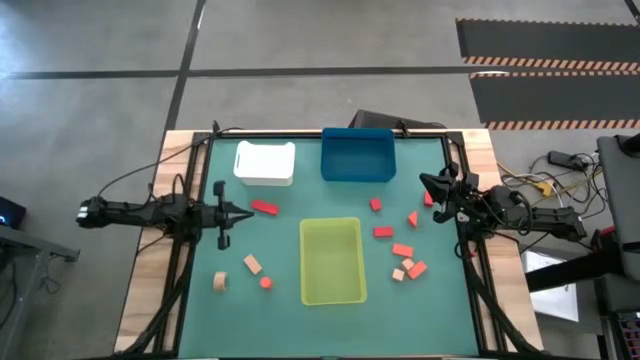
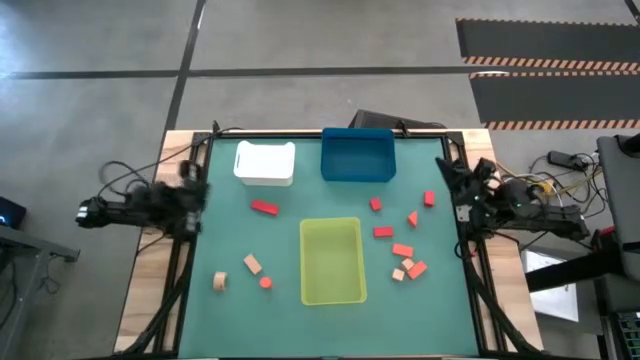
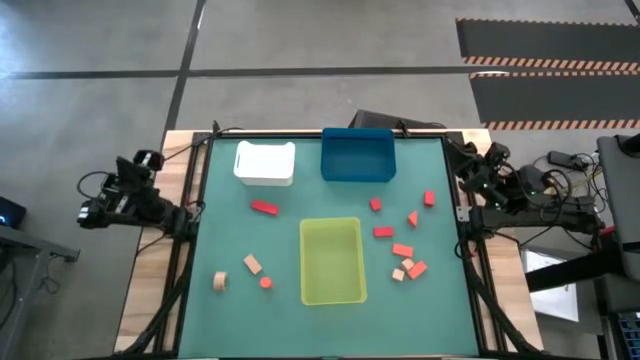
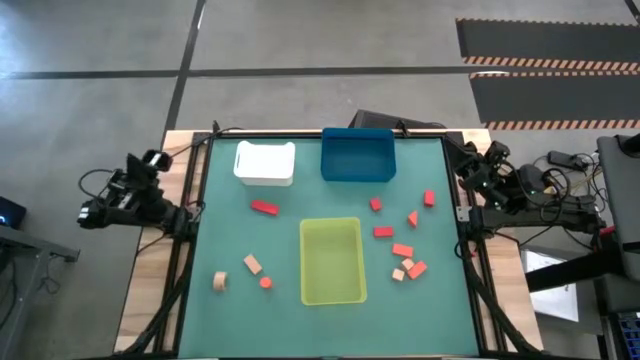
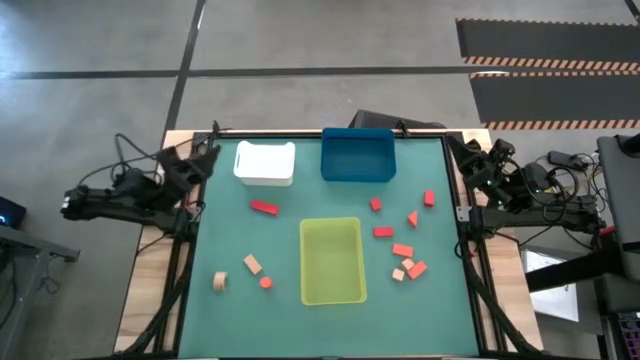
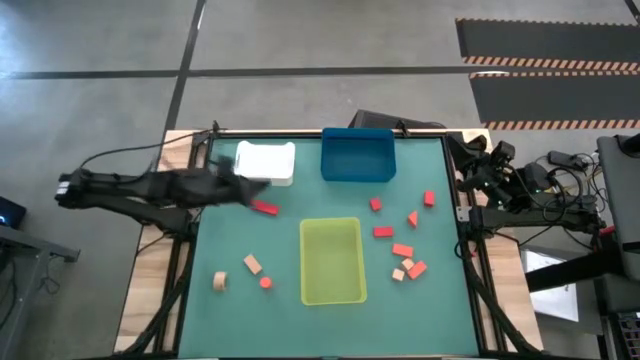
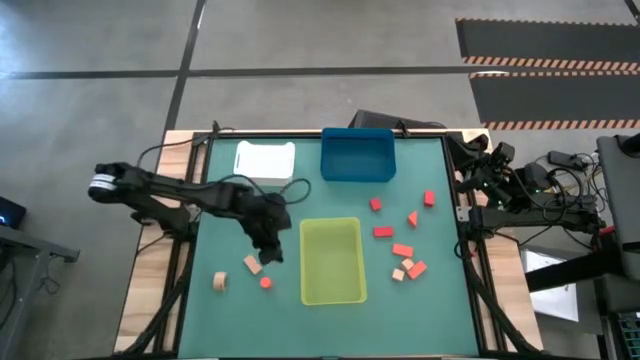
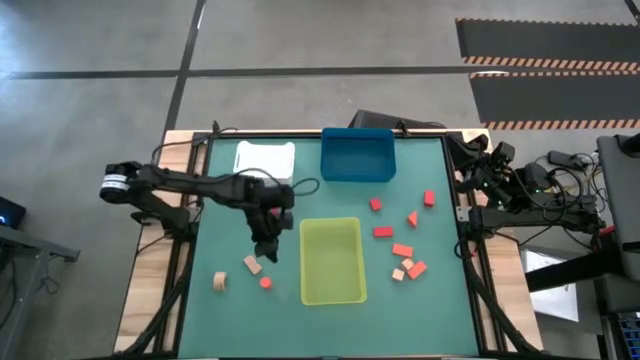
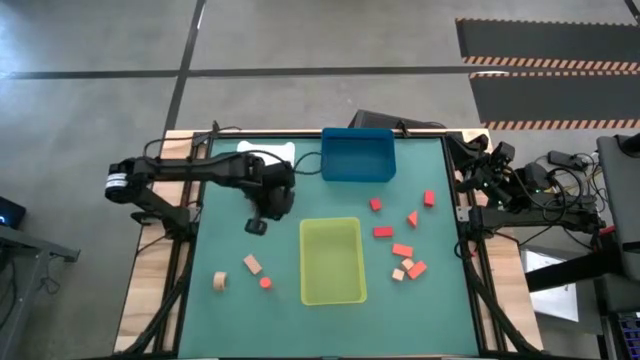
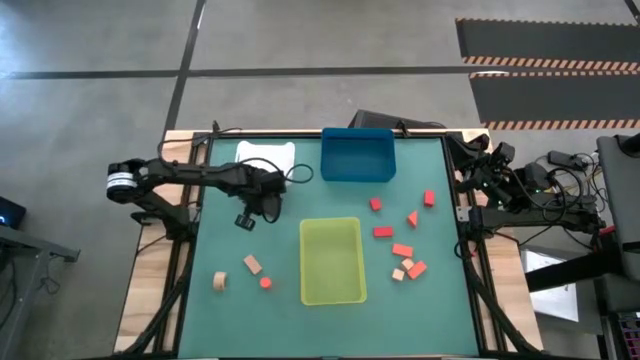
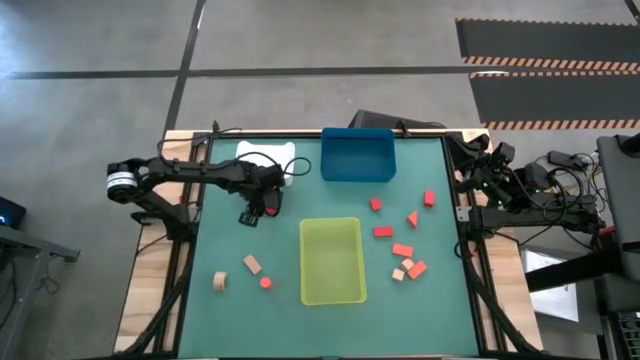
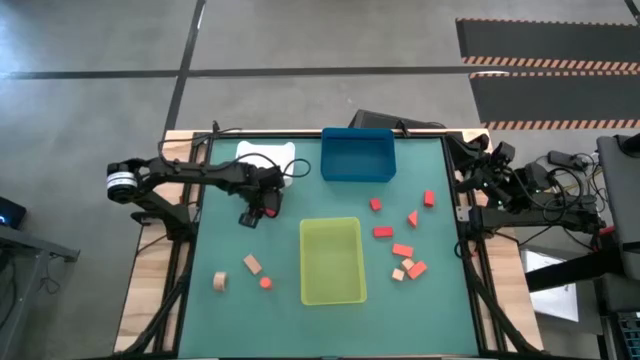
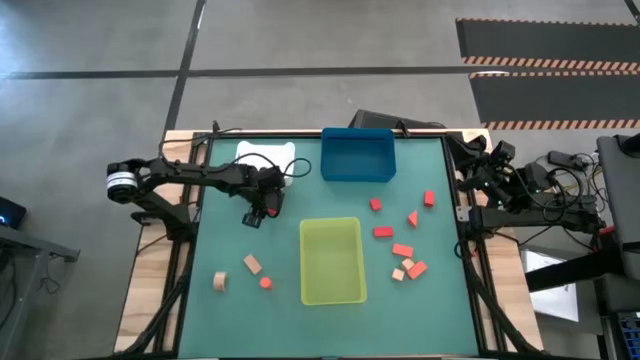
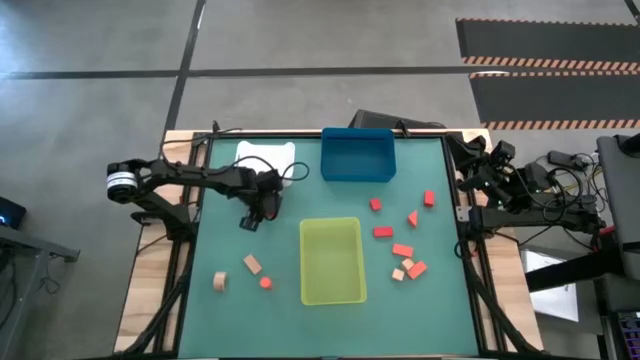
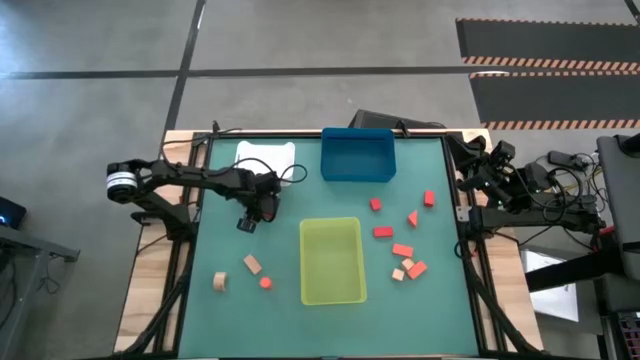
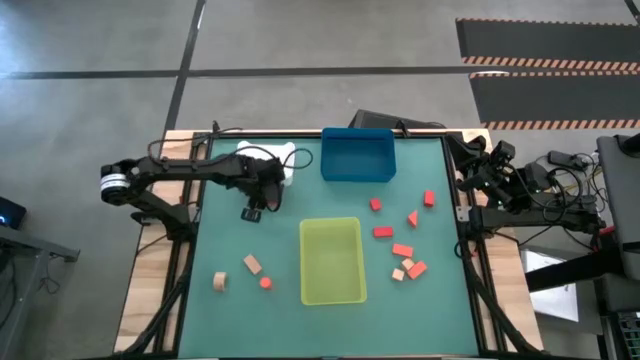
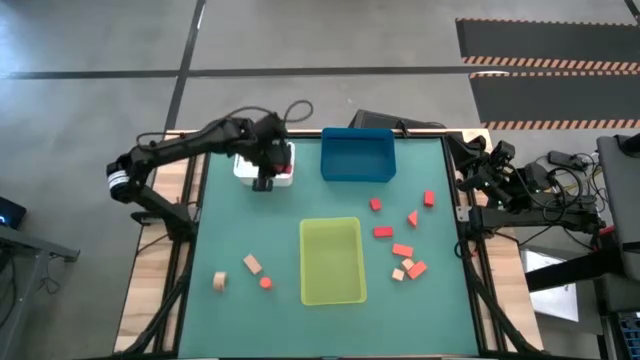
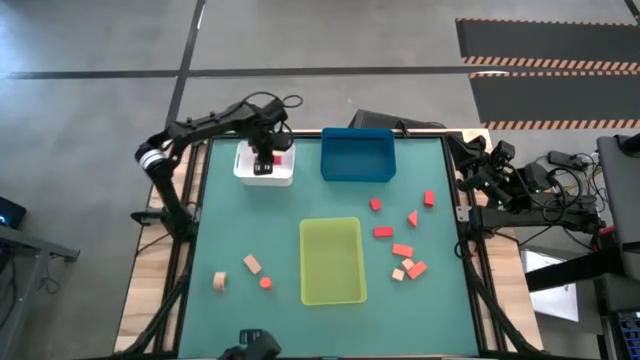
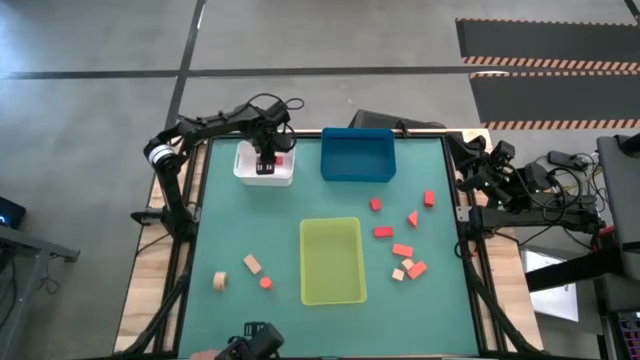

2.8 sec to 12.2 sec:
Task: Sort & place blocks by color
Put the red rectangular block into the white bin

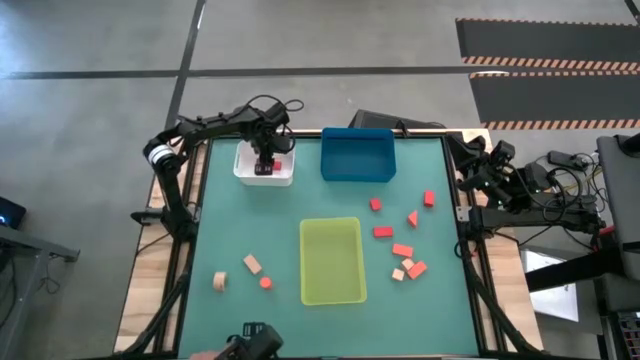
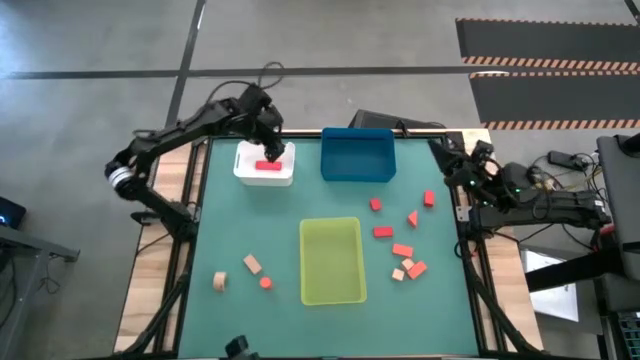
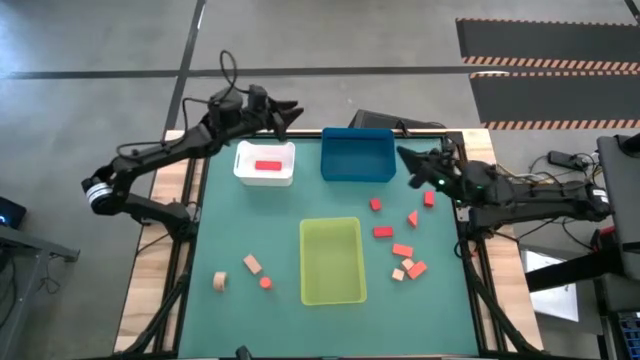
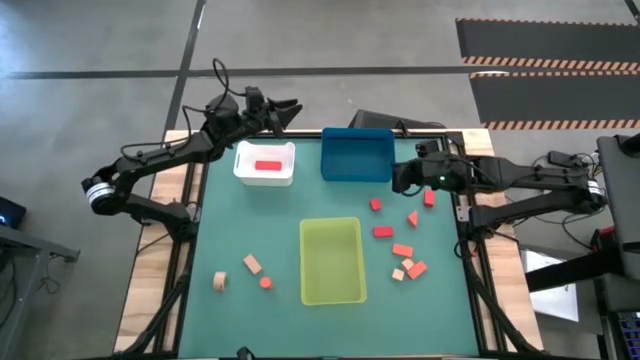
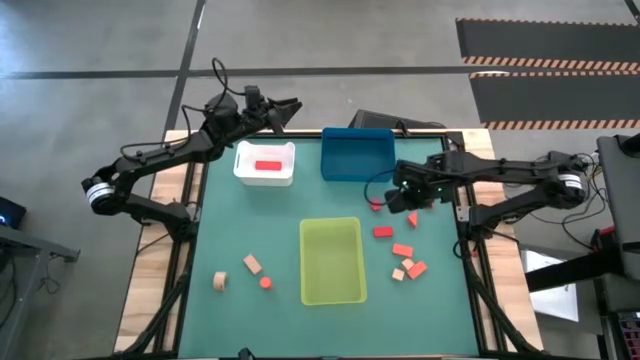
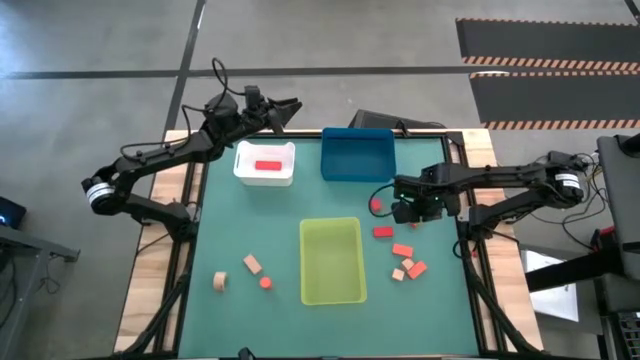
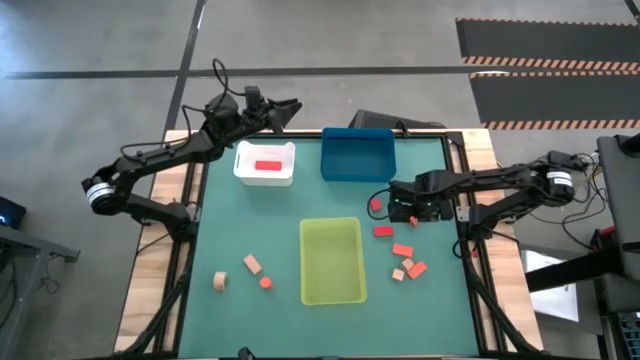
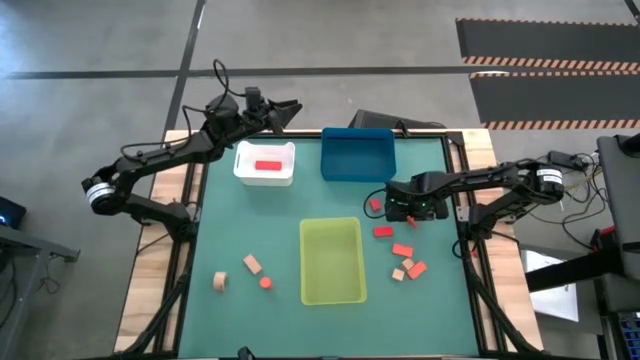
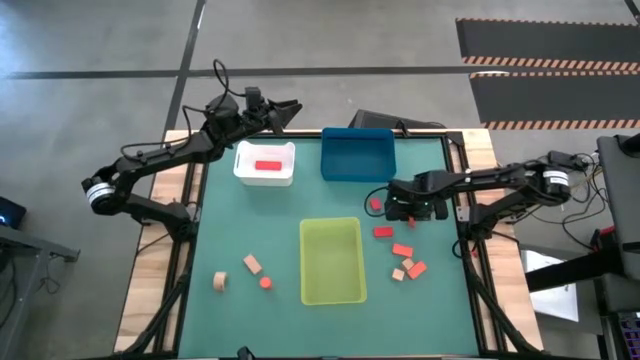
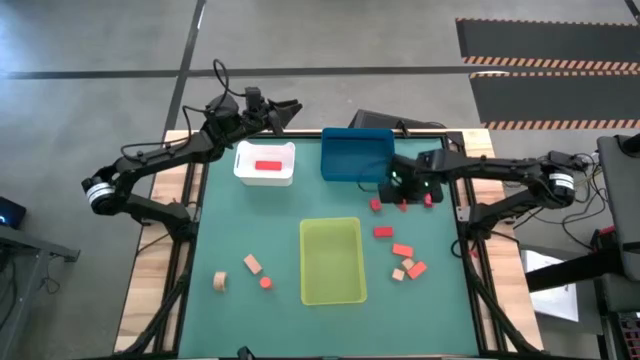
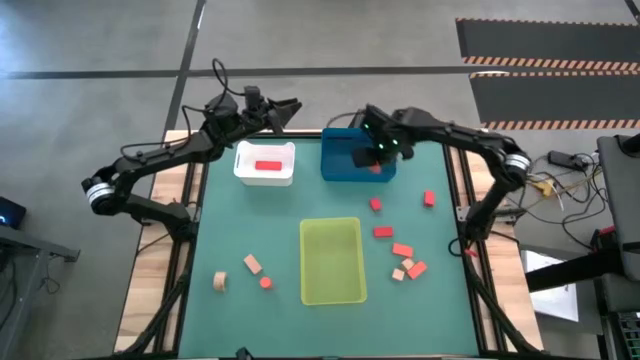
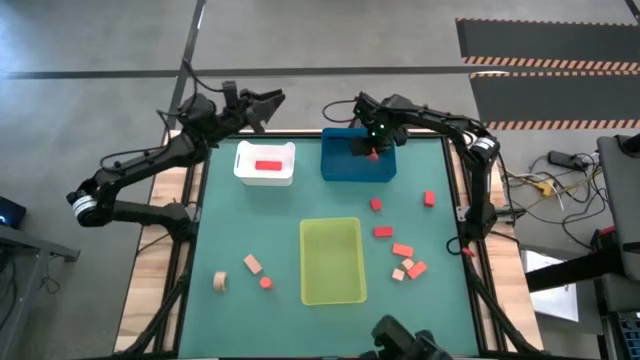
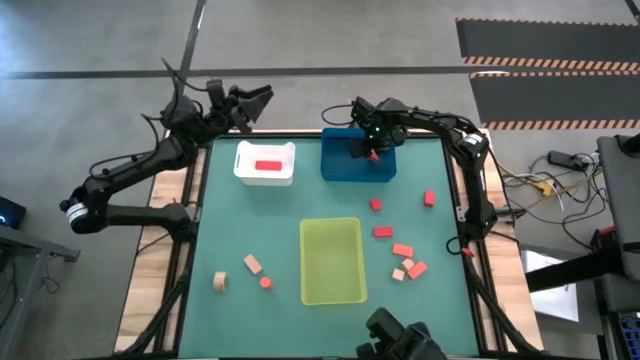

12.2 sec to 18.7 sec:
Put the orange triangular block into the blue bin

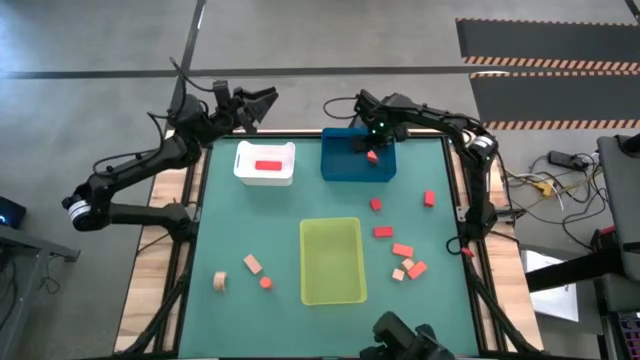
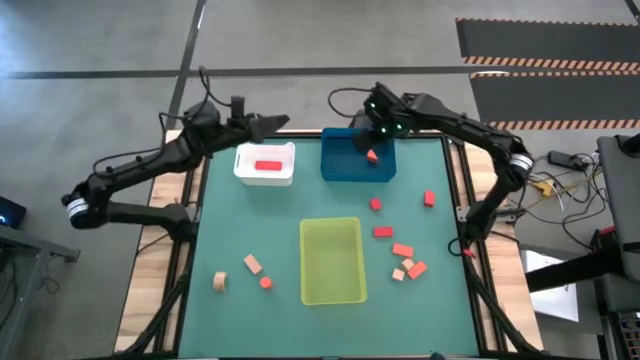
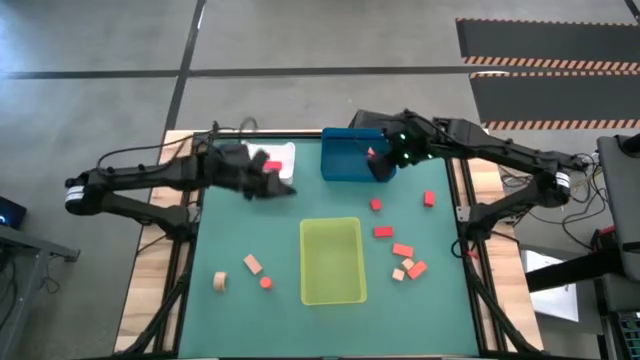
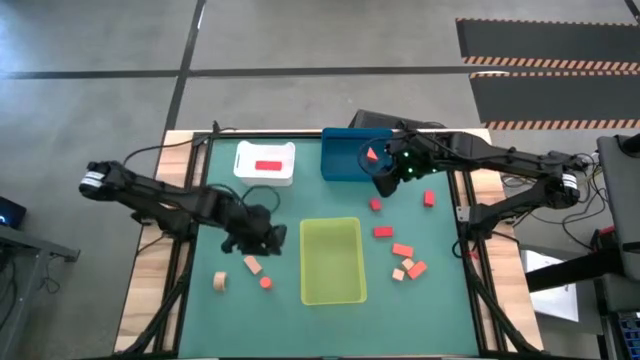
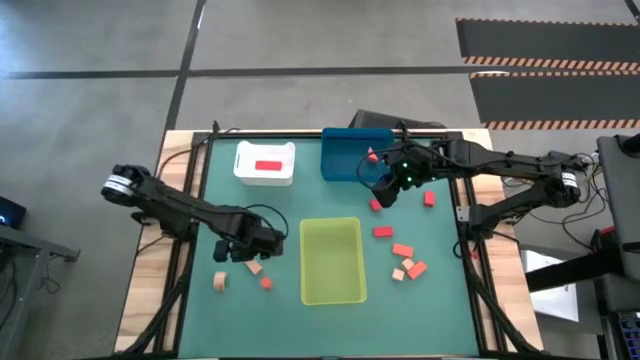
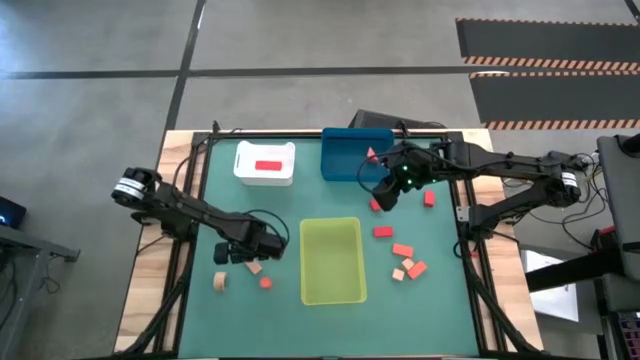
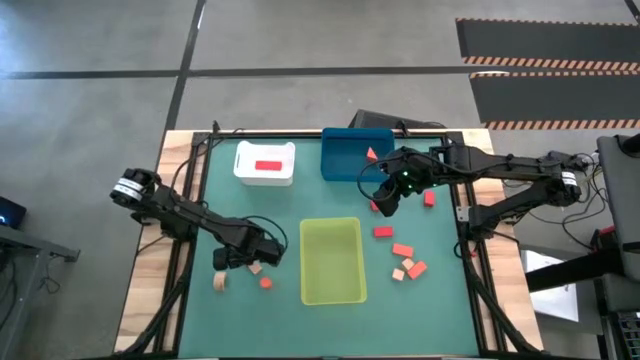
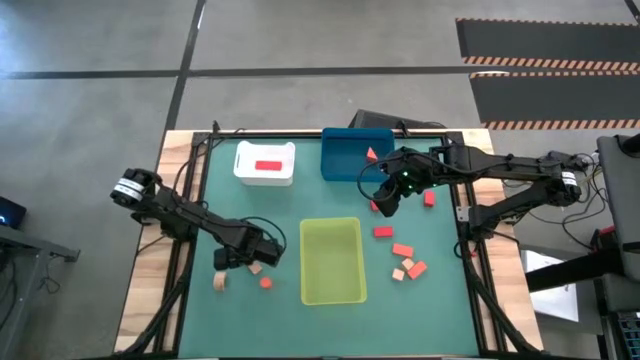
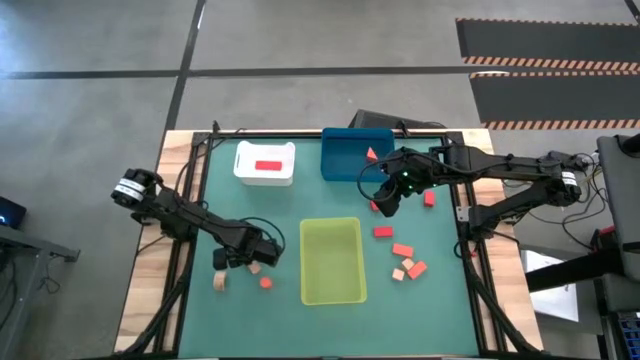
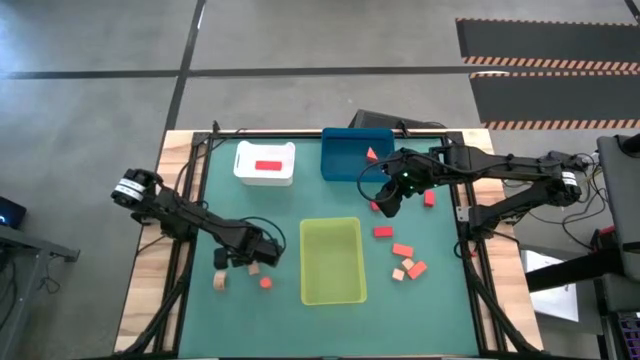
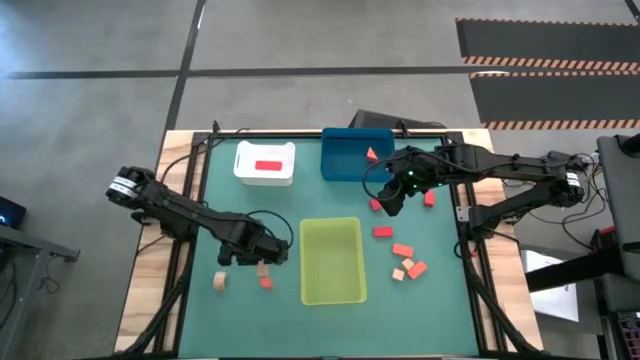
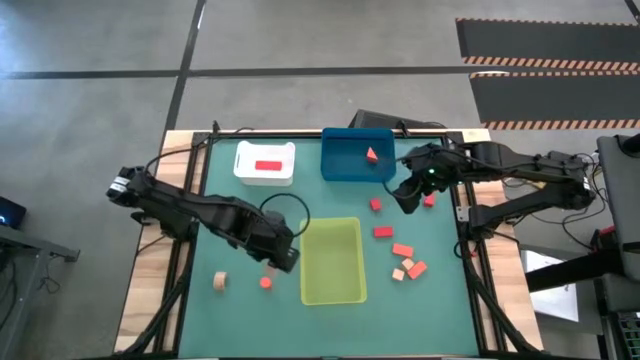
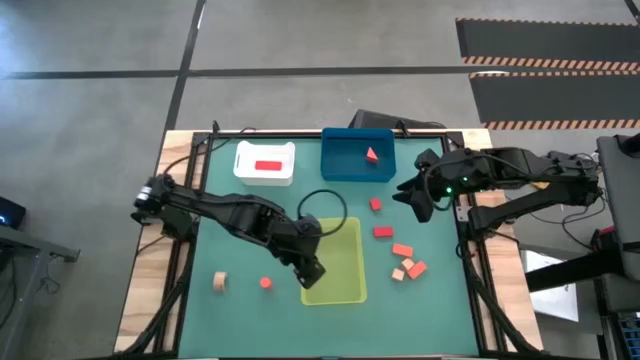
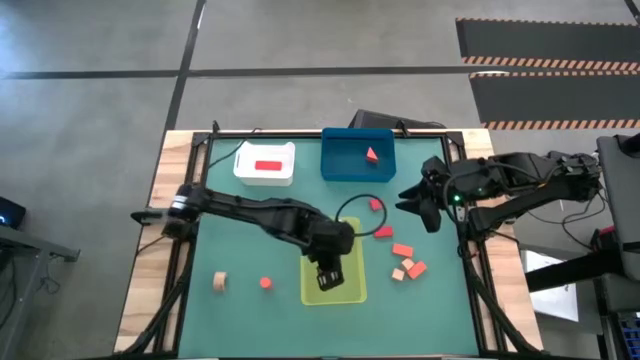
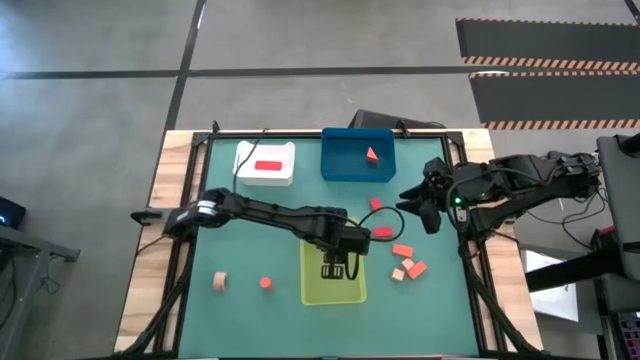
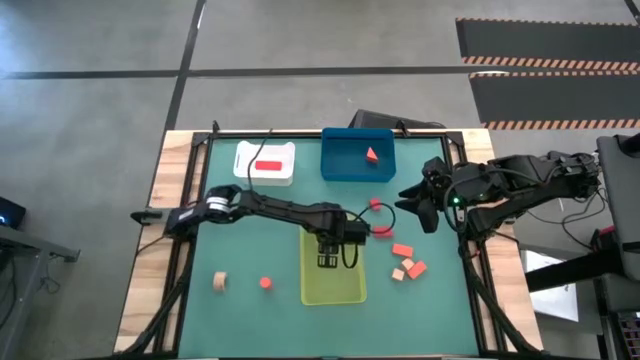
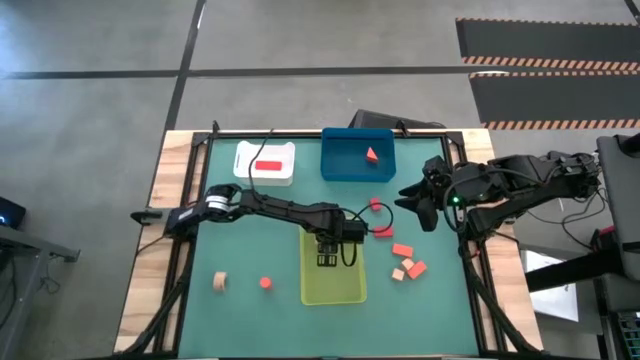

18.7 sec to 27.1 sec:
Put the orange rectangular block into the yellow bin
